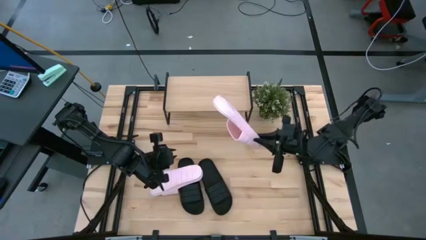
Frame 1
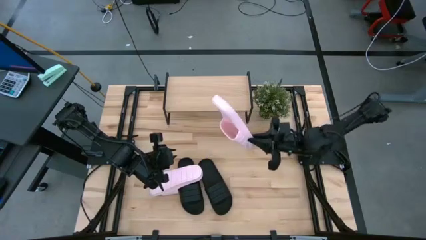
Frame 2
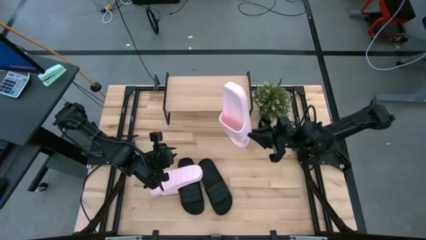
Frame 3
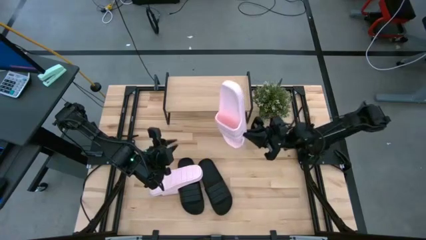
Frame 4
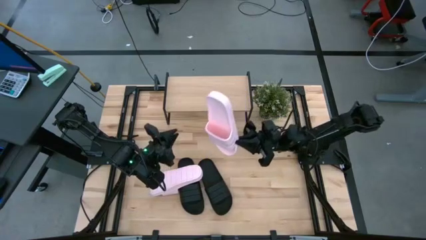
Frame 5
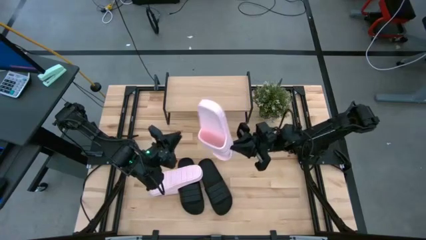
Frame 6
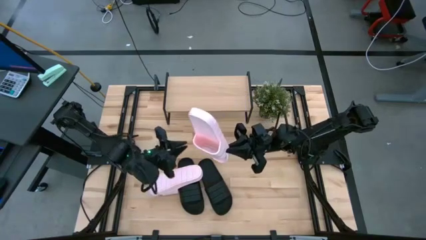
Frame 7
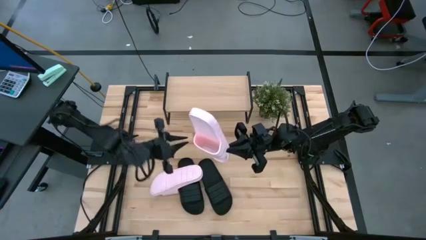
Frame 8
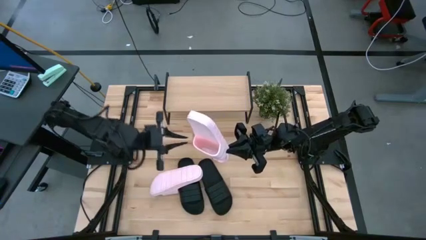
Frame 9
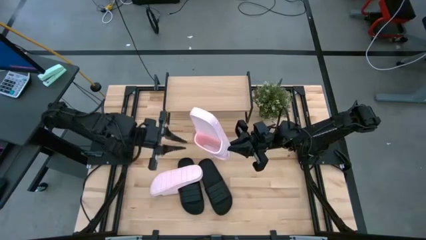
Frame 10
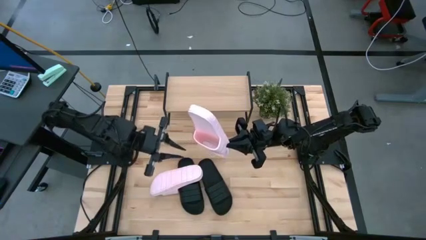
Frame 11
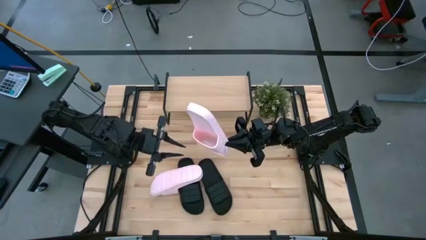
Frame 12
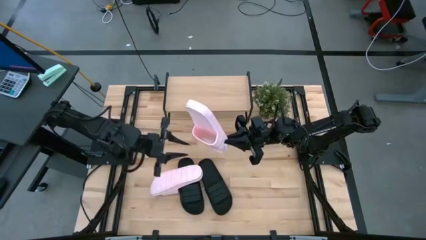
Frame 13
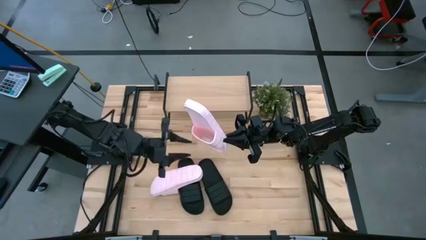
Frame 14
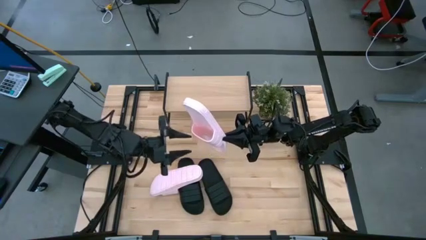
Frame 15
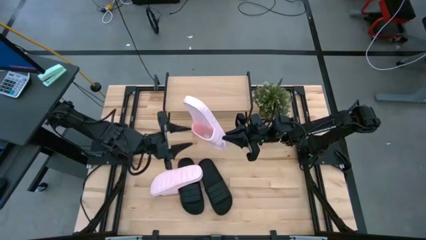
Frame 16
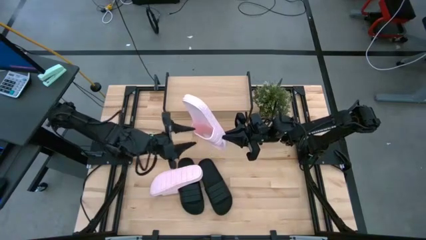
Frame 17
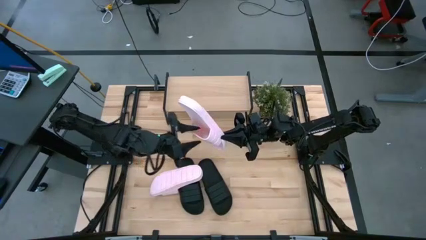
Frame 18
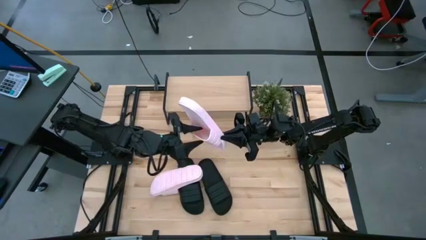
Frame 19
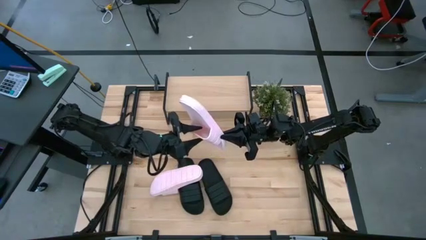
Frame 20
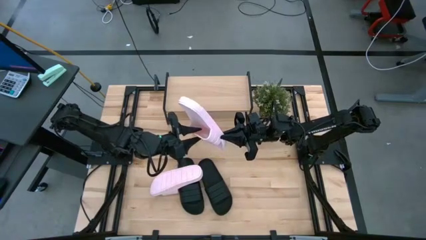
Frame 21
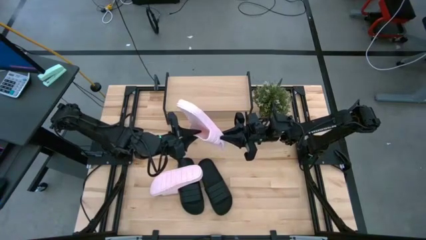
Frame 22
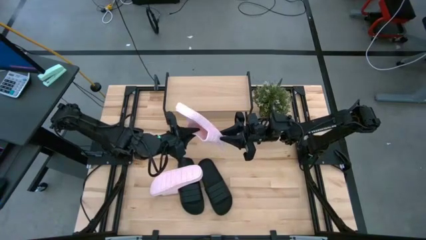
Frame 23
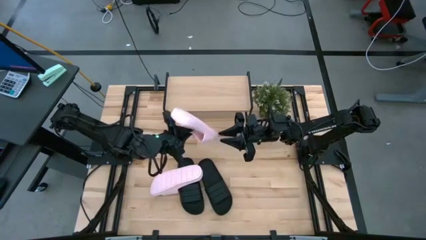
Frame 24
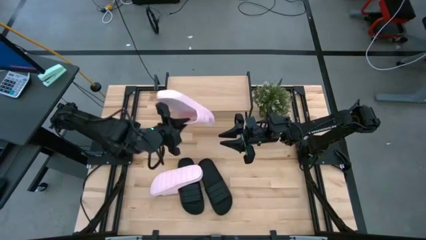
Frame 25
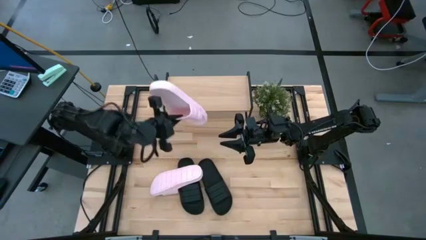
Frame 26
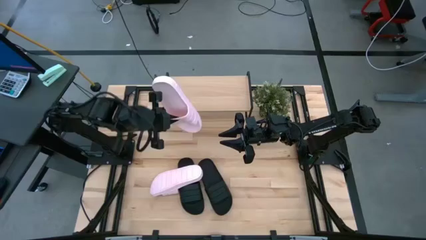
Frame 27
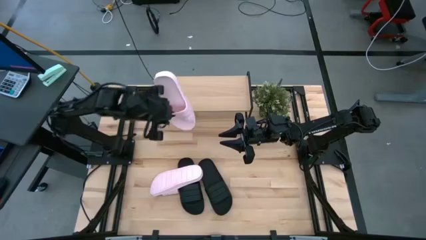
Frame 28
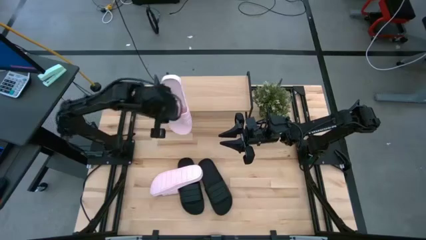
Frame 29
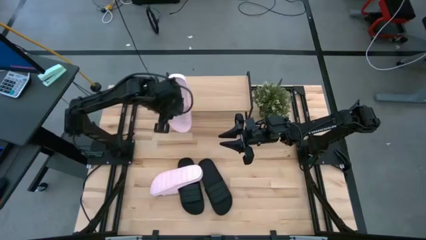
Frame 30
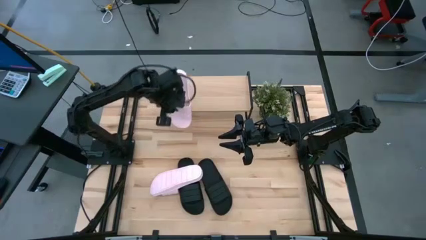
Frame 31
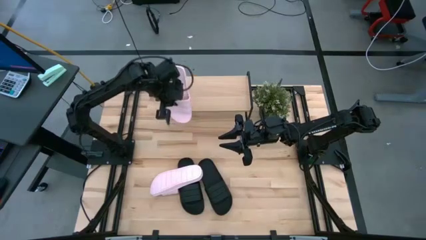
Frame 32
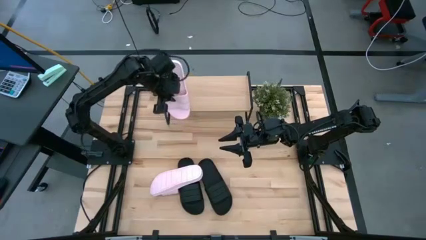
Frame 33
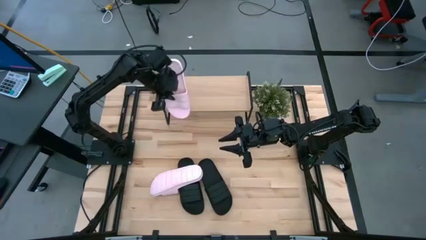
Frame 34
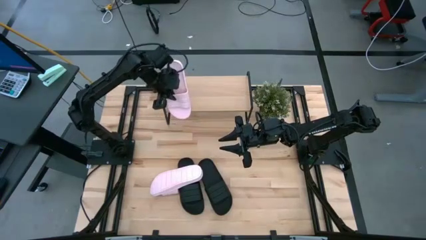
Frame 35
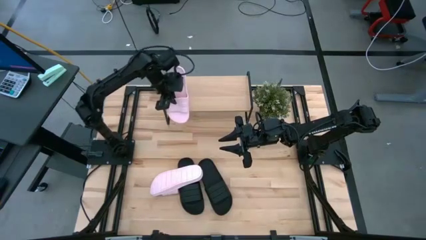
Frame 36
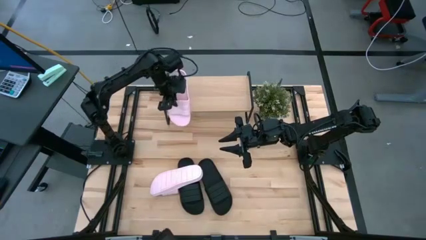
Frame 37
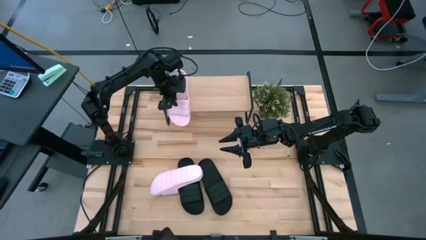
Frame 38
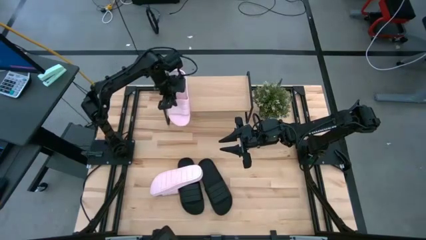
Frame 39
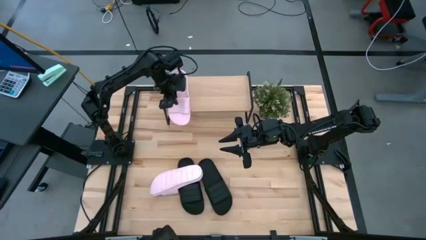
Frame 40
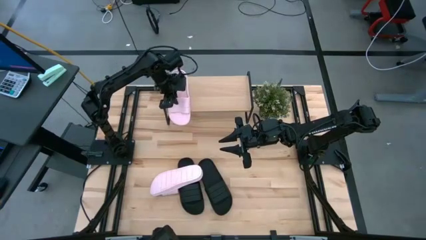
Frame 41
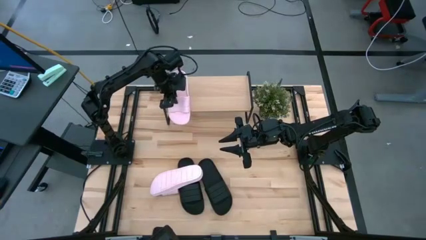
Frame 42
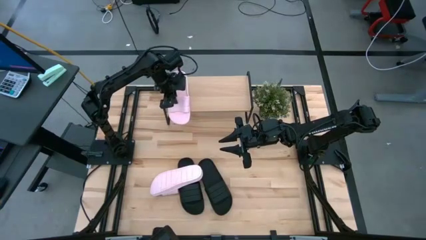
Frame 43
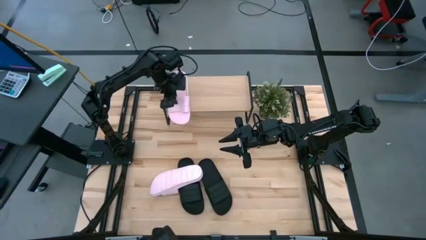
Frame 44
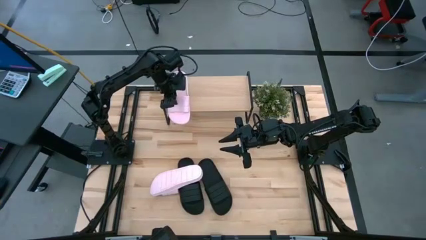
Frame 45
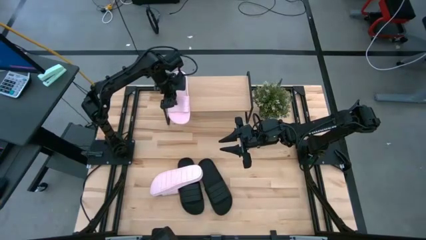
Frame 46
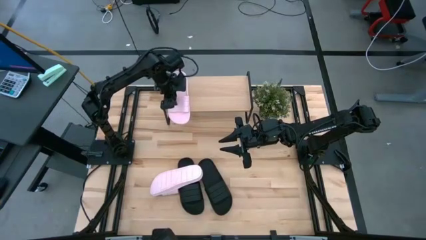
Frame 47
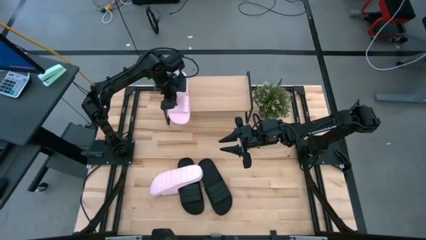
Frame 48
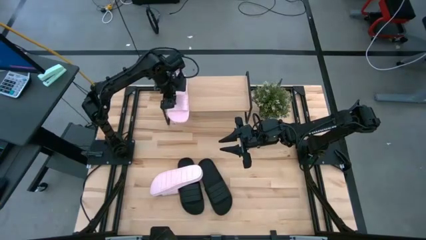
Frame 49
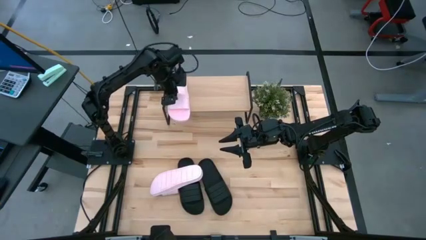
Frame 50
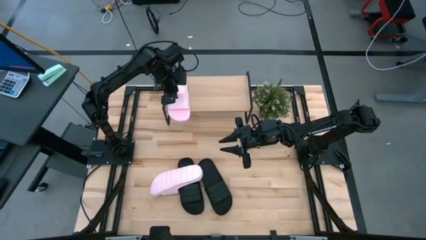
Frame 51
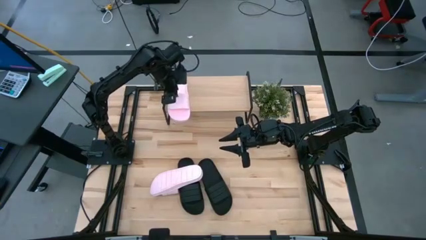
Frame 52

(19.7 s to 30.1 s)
Task: Pick and place slides into the shelf
Put the right pink slide on the shelf
